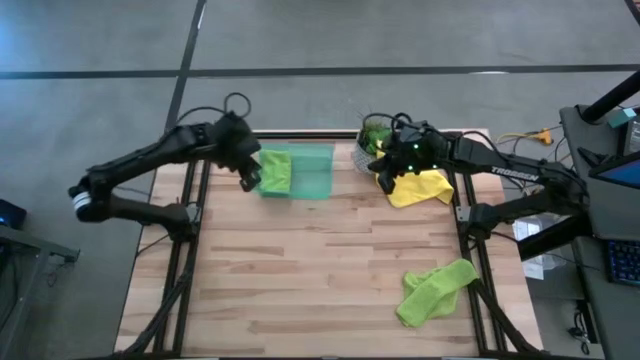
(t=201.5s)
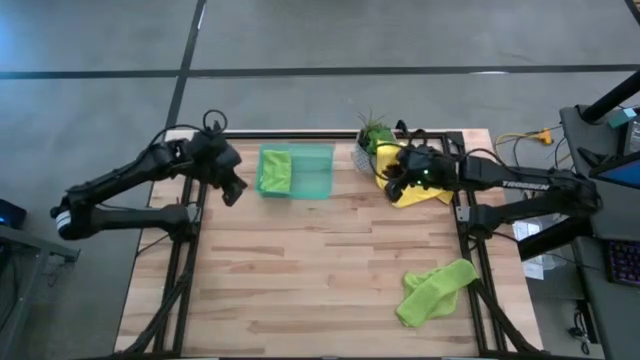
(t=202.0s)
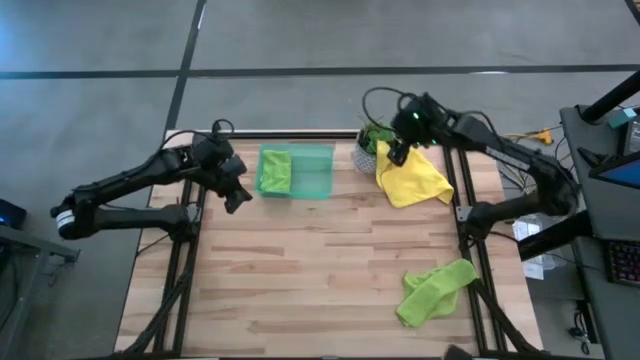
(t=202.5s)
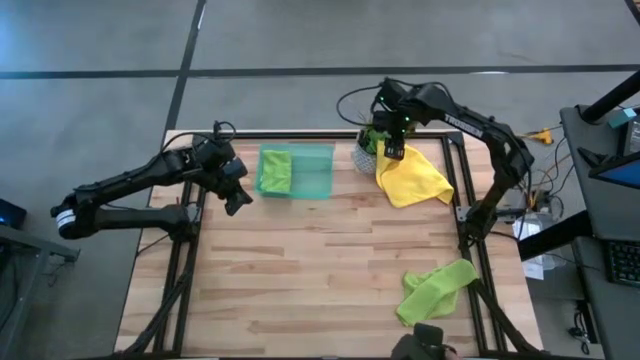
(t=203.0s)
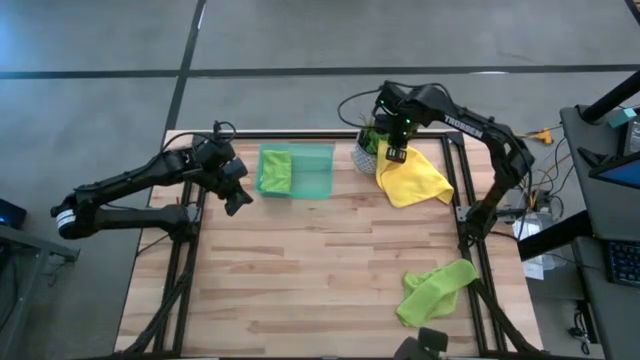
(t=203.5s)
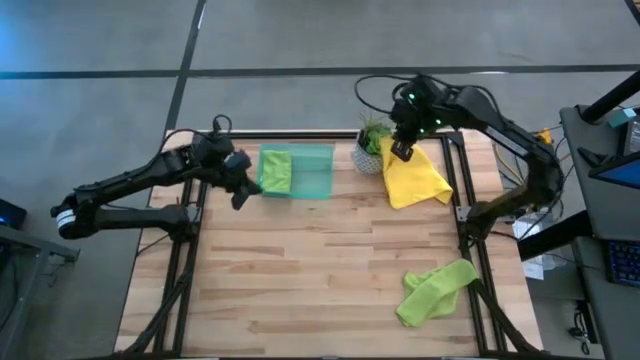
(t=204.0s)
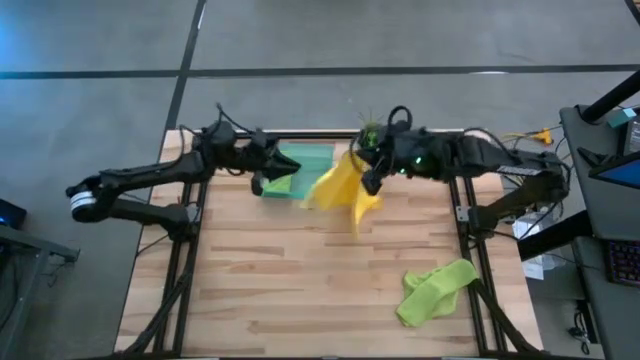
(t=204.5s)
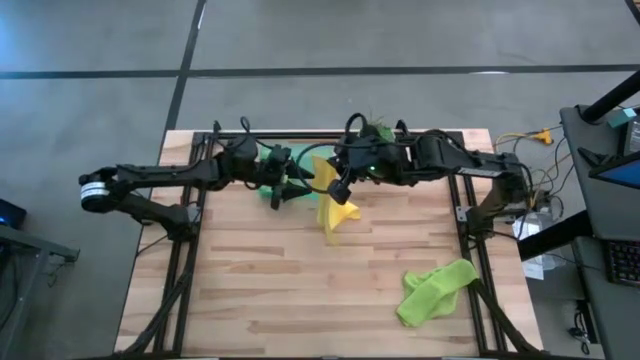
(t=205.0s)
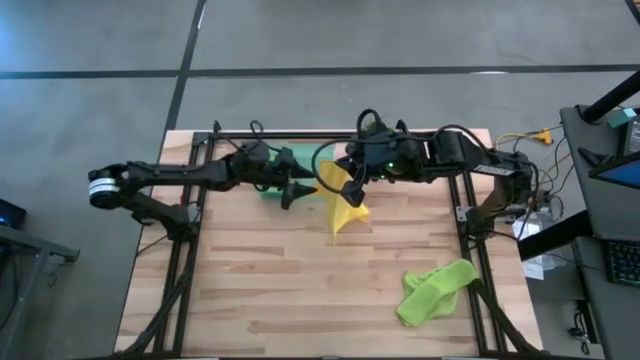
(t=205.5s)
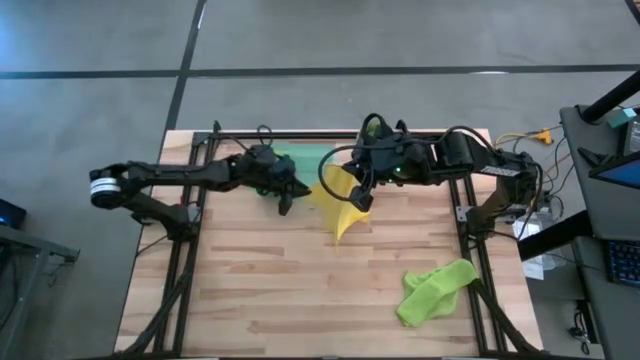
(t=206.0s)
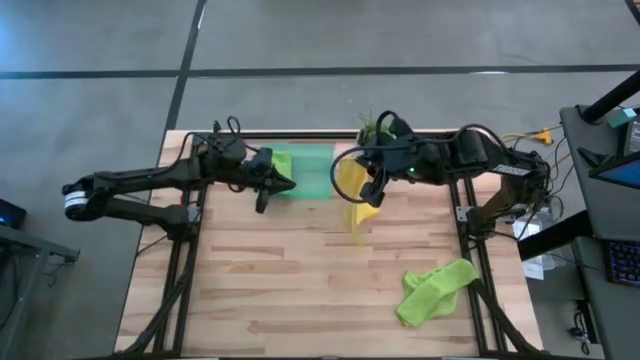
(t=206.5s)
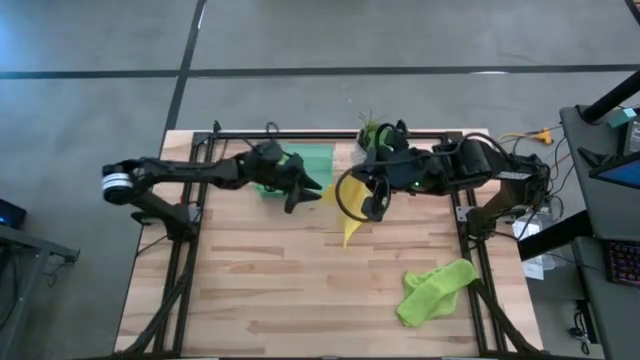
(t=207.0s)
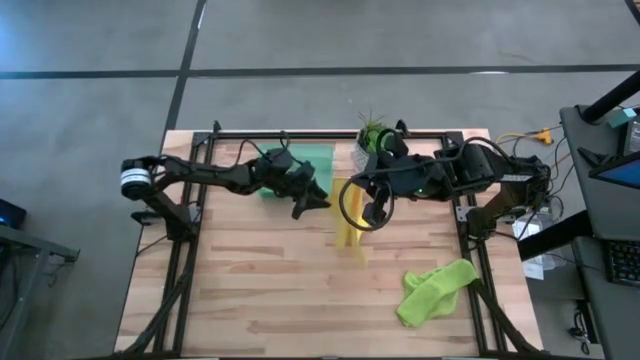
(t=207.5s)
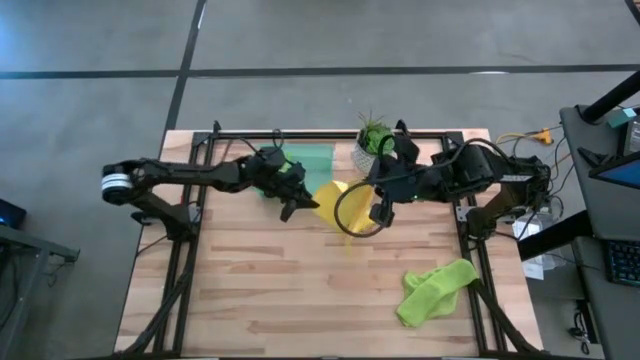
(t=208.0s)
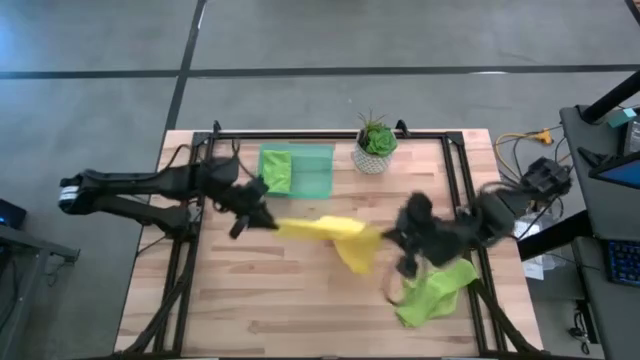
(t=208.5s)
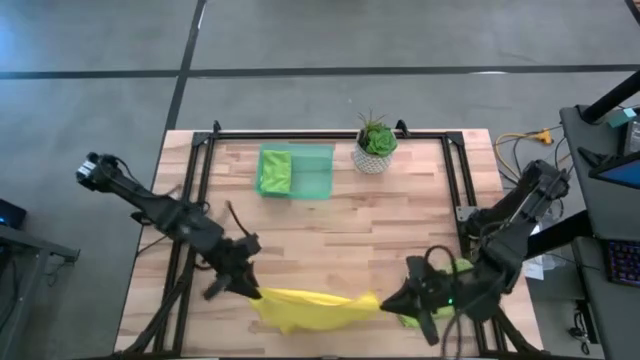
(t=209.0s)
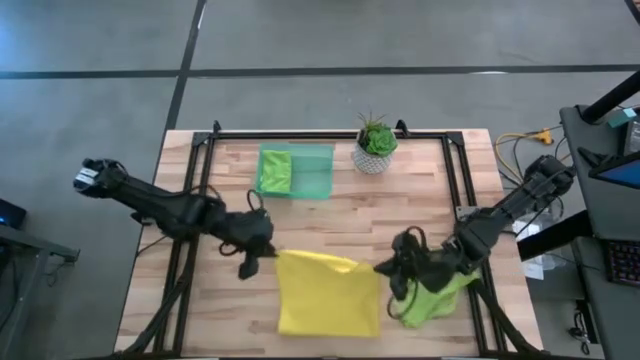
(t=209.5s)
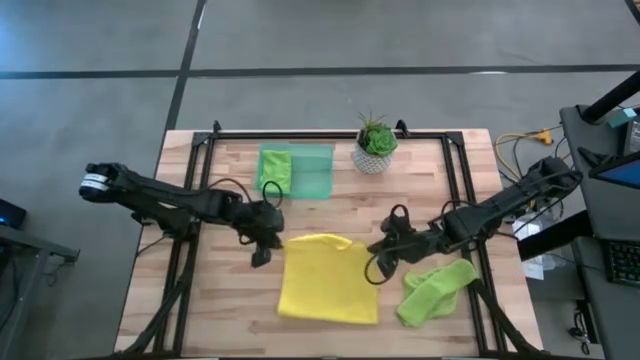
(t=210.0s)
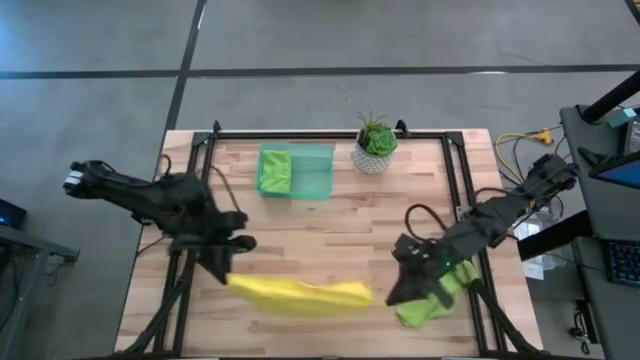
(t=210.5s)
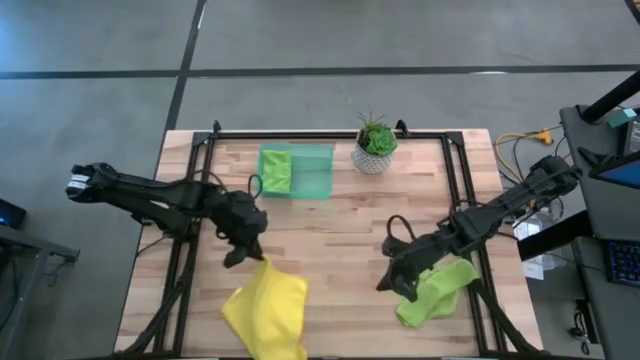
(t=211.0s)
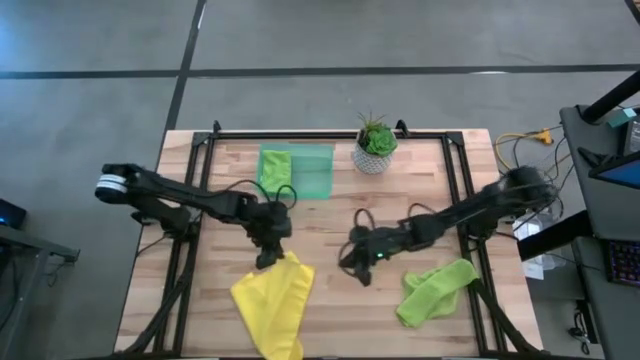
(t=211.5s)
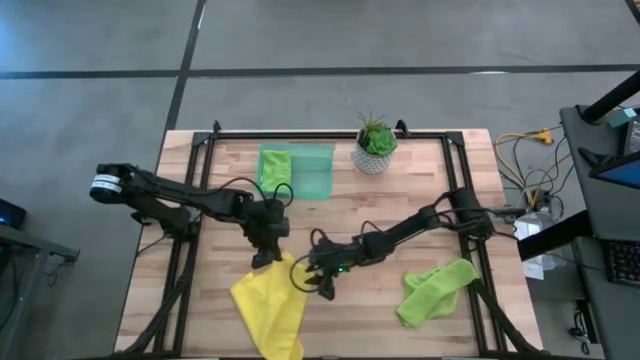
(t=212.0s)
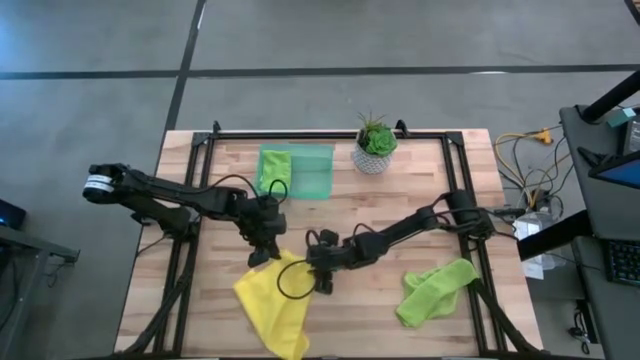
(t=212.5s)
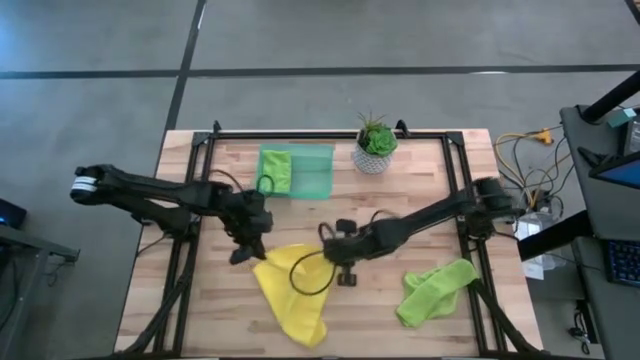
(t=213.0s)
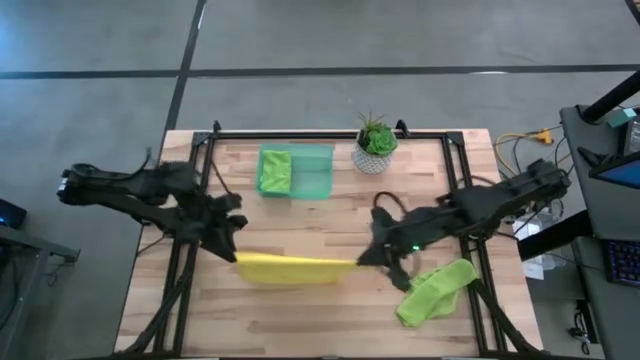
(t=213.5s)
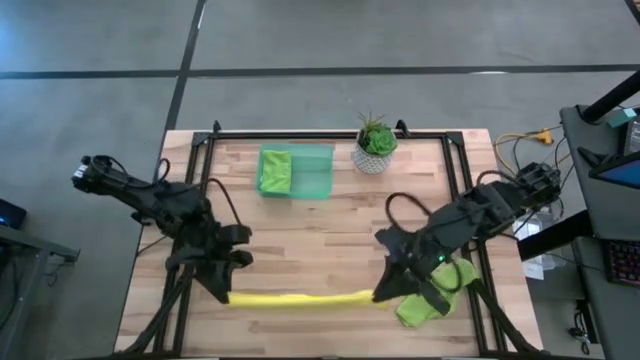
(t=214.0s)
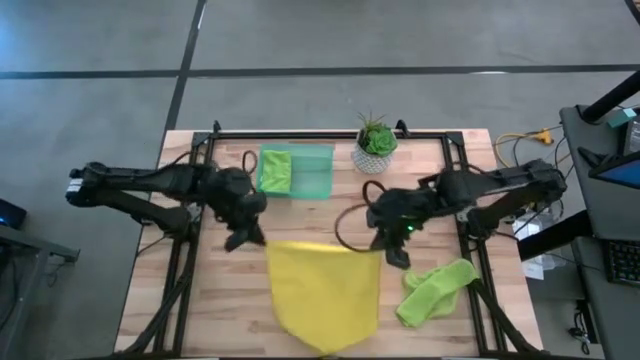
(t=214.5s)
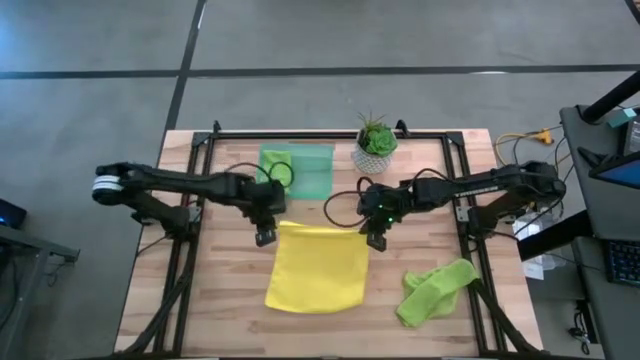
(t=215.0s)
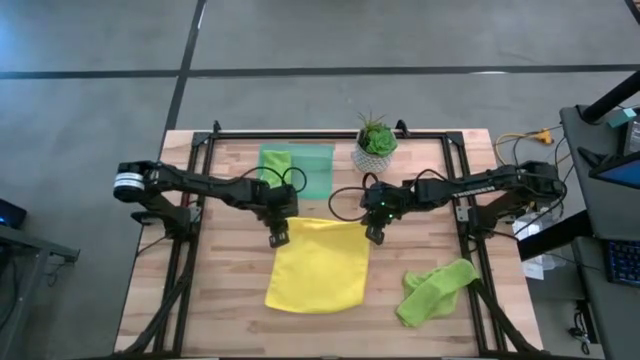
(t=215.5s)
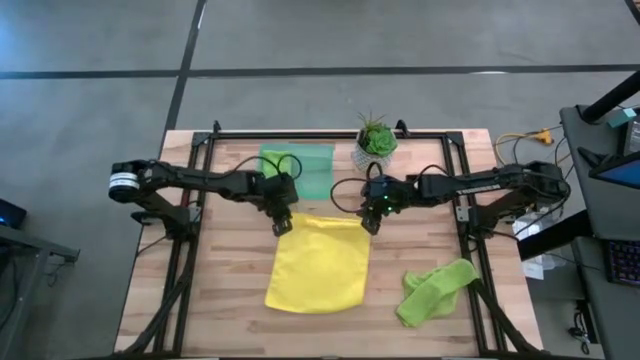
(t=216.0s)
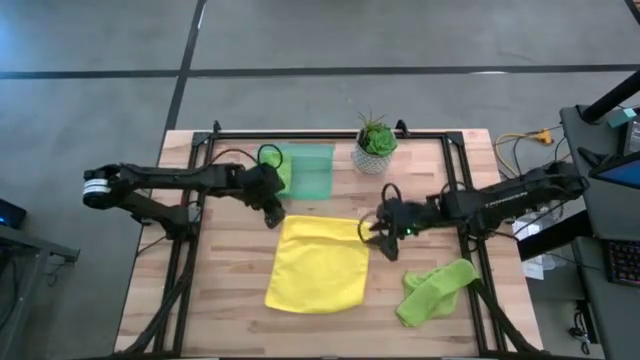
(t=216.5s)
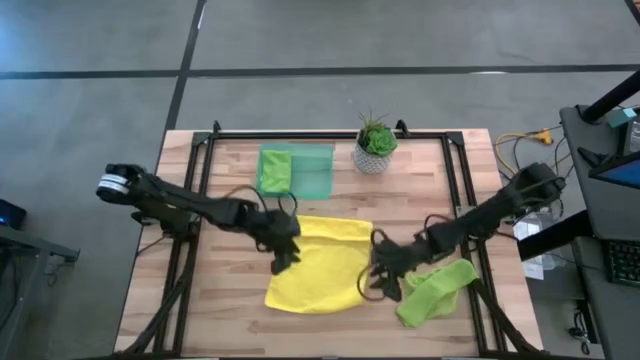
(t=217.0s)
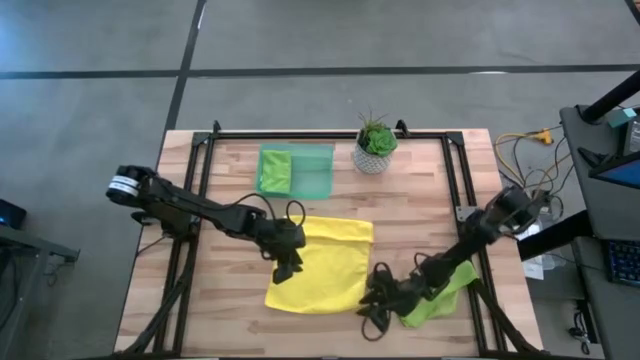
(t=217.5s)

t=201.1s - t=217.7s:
Task: Fold microfiber towels
Fold the yellow microfiber towel
